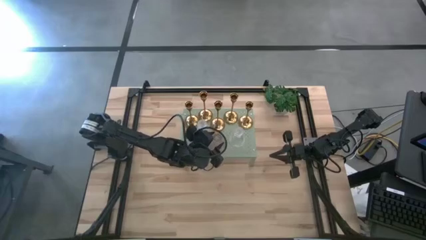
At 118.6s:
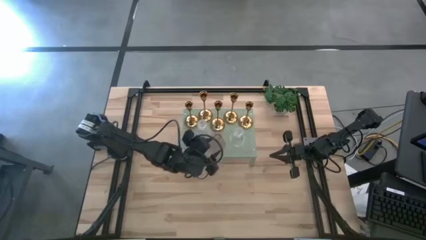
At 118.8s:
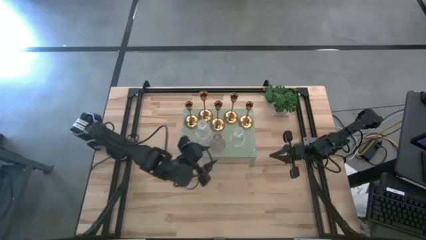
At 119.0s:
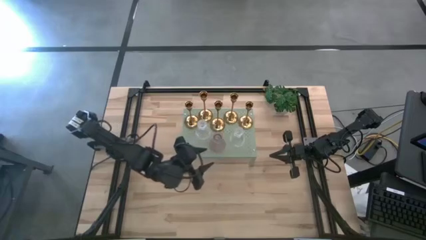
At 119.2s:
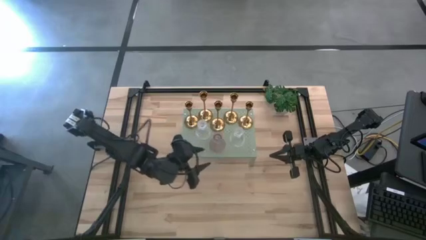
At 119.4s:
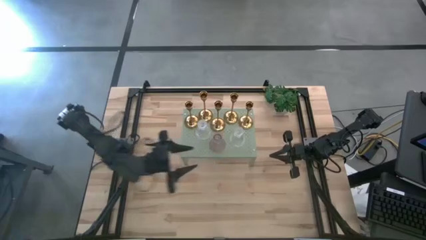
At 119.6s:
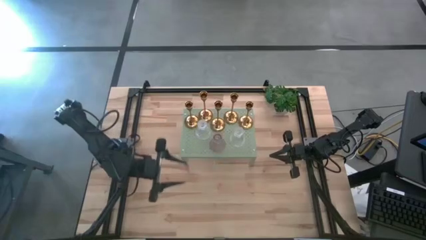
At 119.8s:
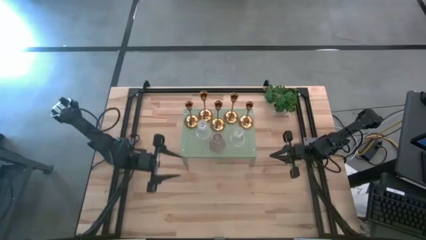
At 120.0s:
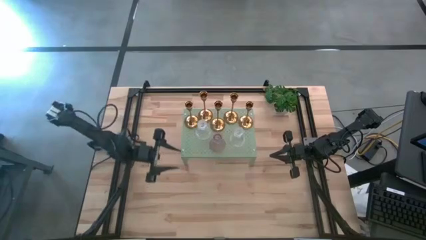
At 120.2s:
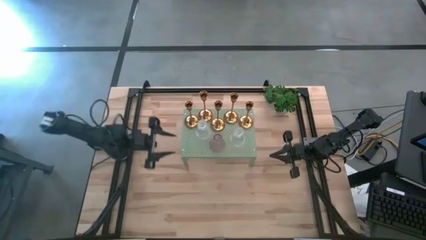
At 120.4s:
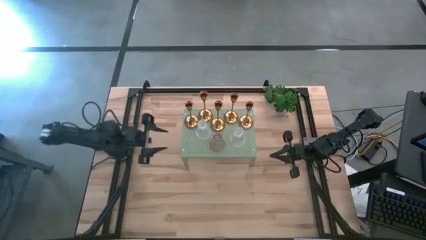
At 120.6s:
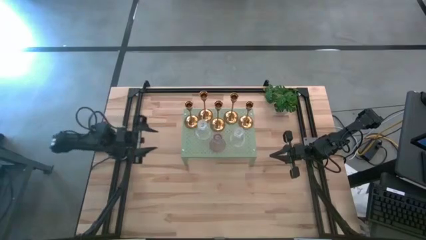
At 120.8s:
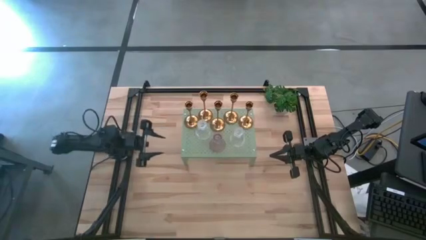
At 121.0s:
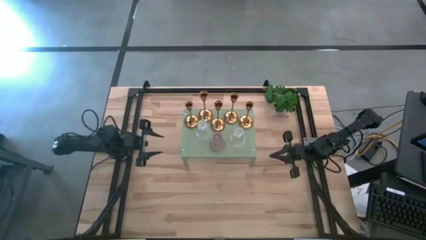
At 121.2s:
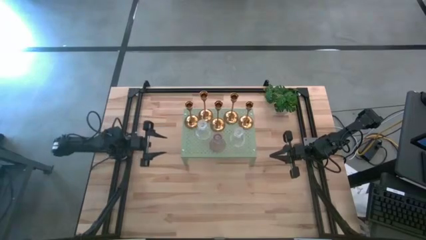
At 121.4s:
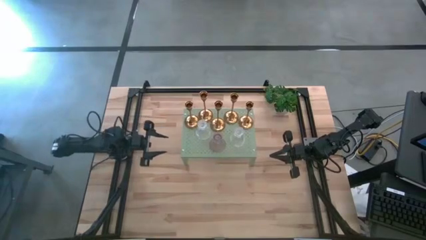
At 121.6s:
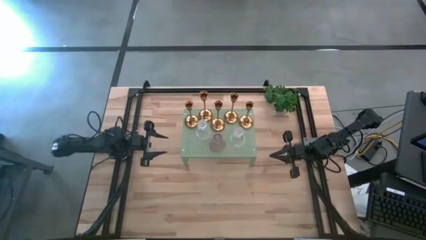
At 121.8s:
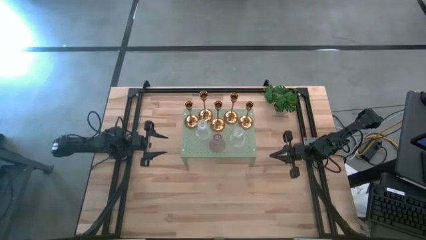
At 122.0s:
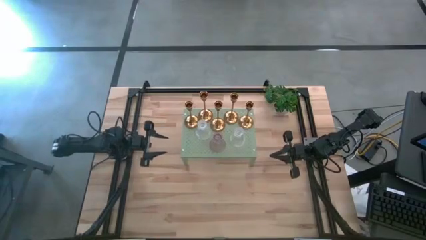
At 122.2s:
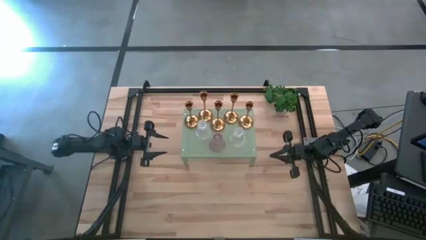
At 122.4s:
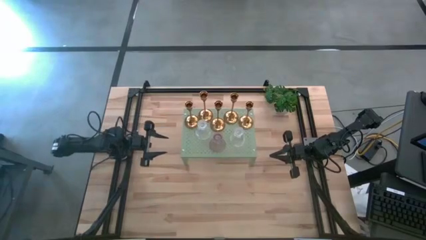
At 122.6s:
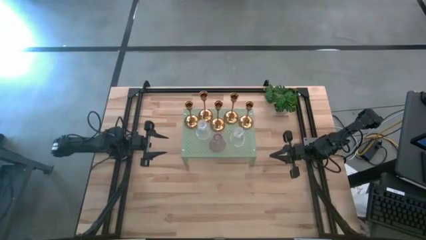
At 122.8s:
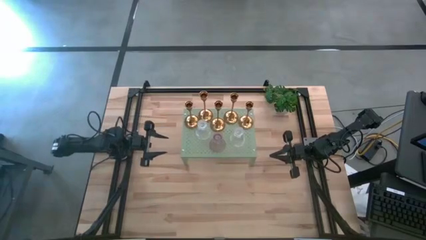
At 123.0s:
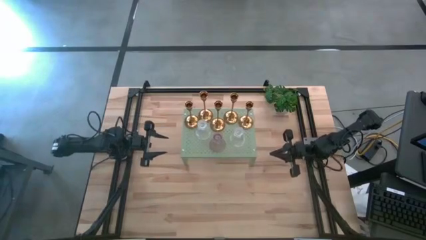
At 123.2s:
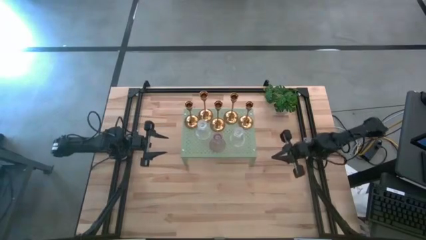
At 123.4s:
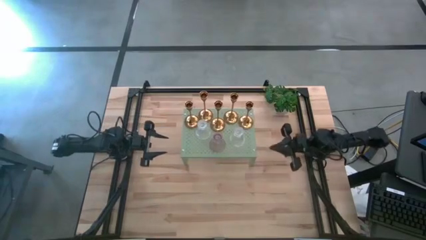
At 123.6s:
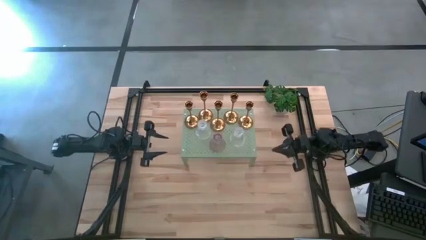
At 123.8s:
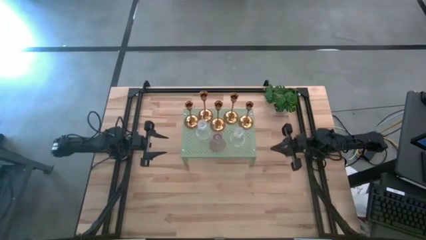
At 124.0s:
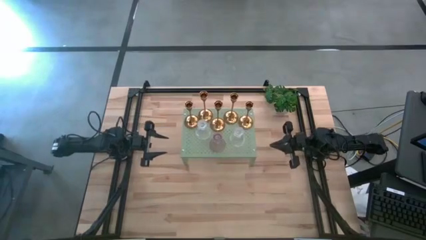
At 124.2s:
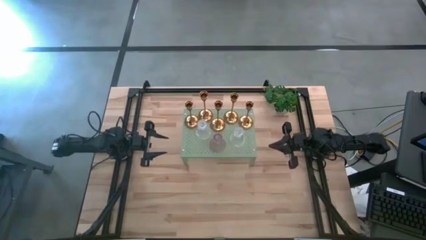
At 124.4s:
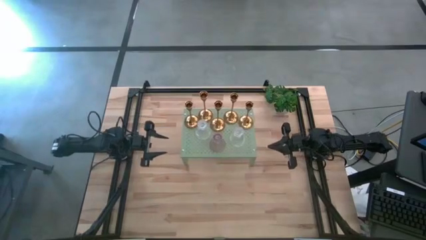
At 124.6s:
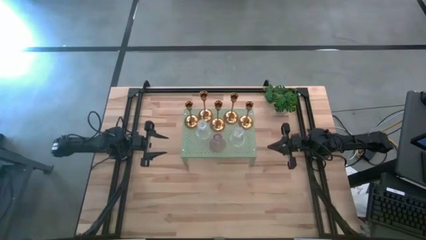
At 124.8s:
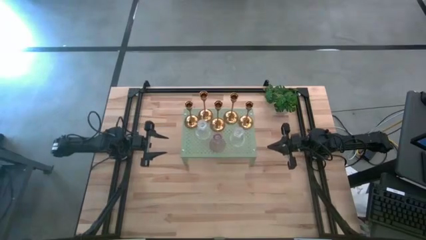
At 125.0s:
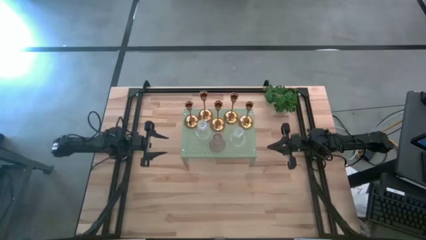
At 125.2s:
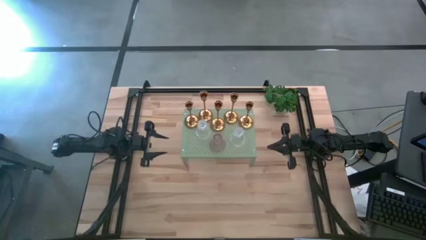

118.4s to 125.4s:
Task: Pick & Place candle stick holders
Return to Home Position
